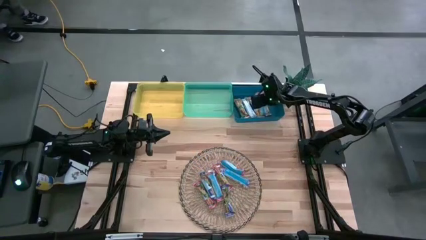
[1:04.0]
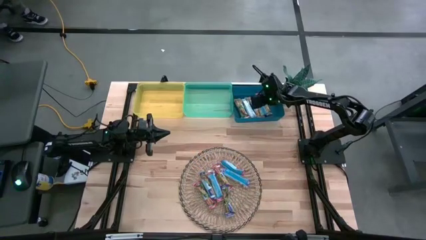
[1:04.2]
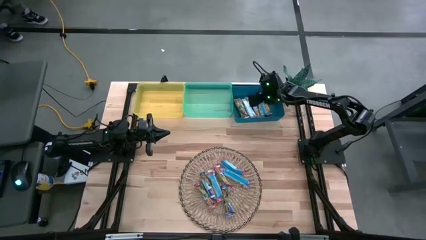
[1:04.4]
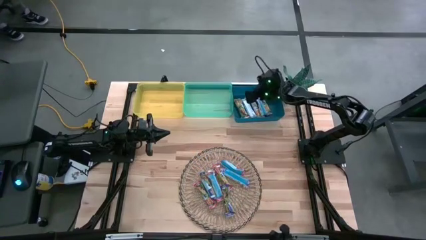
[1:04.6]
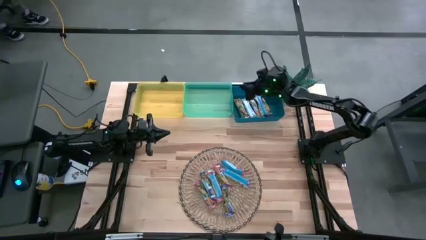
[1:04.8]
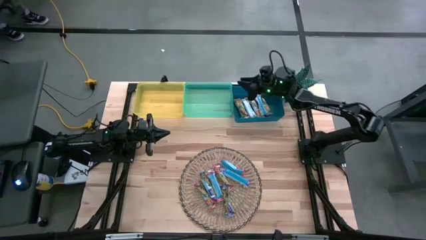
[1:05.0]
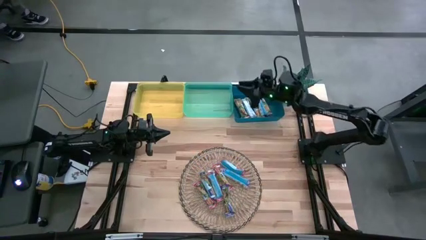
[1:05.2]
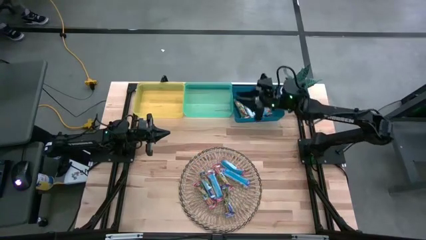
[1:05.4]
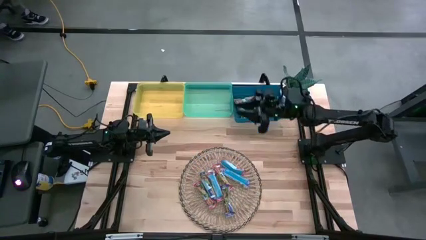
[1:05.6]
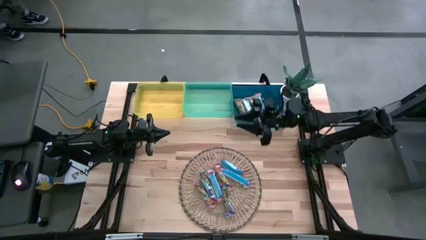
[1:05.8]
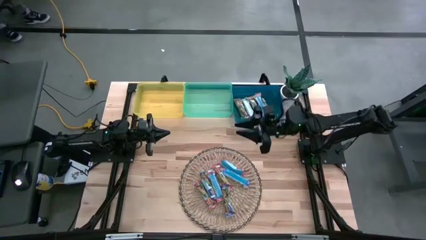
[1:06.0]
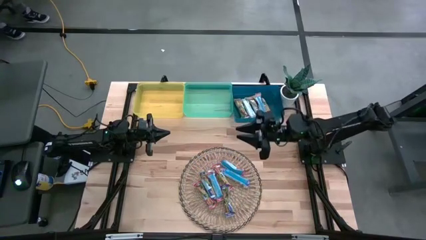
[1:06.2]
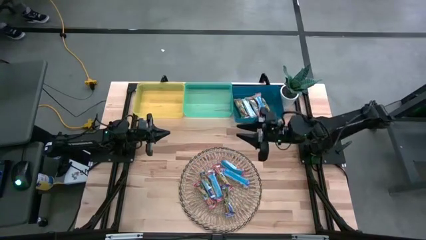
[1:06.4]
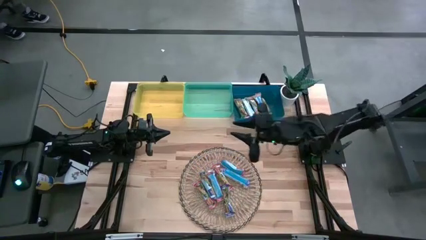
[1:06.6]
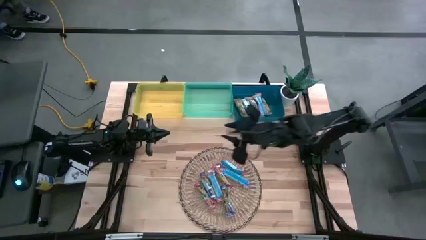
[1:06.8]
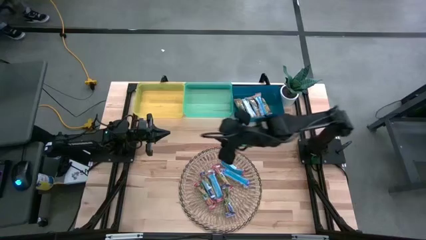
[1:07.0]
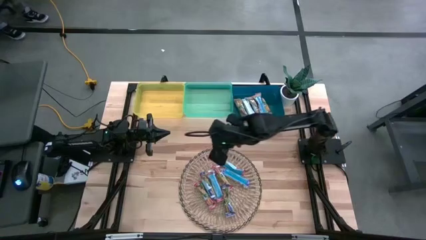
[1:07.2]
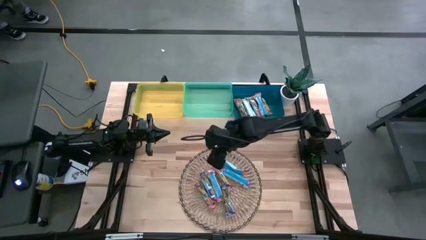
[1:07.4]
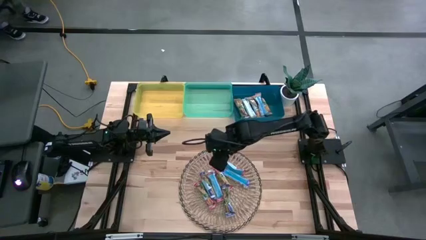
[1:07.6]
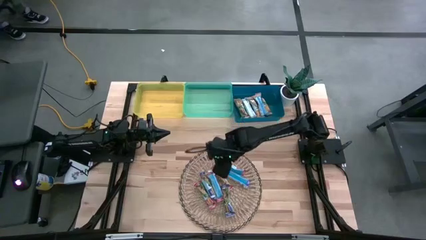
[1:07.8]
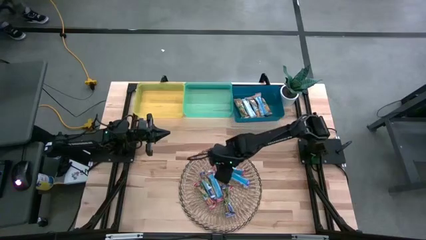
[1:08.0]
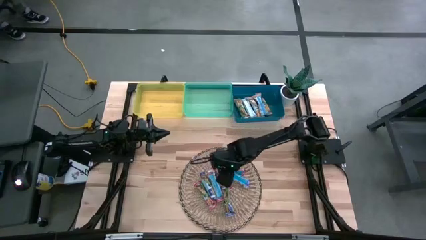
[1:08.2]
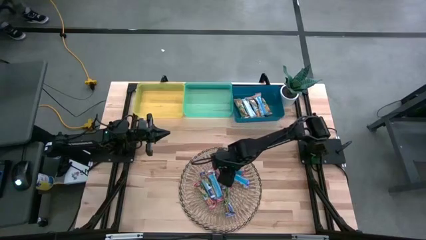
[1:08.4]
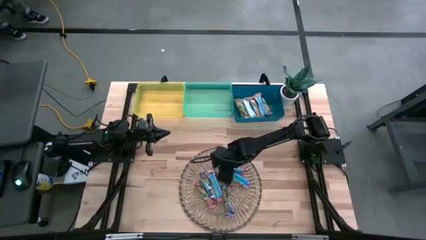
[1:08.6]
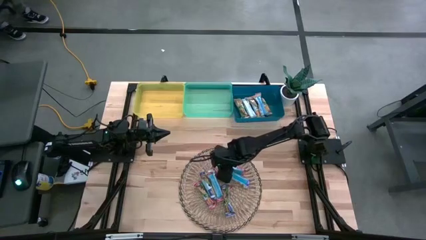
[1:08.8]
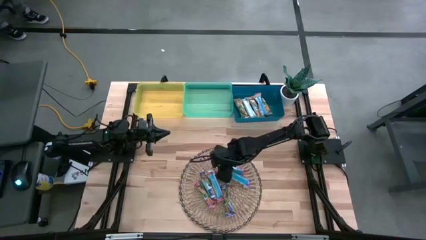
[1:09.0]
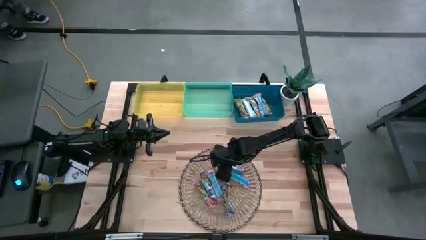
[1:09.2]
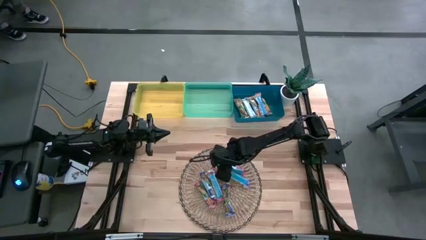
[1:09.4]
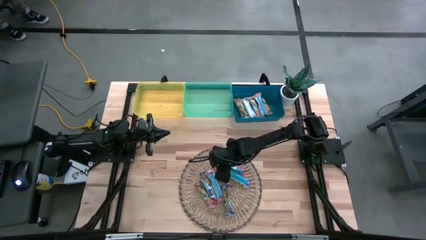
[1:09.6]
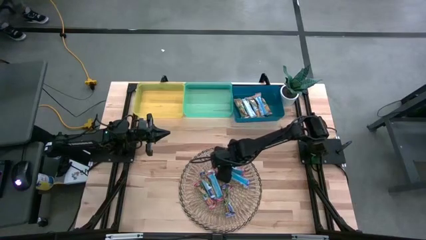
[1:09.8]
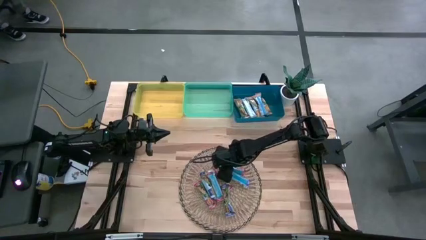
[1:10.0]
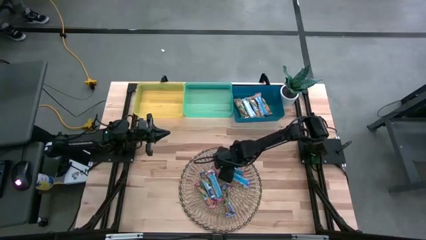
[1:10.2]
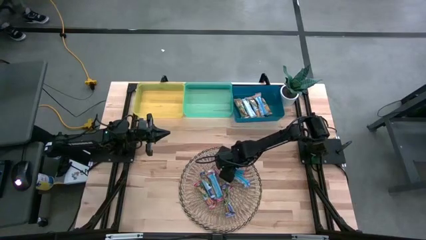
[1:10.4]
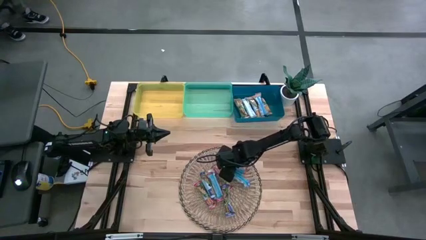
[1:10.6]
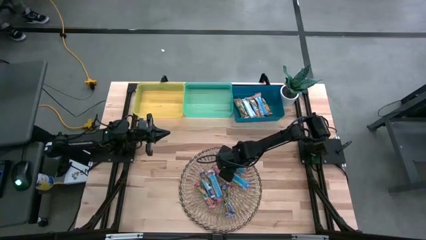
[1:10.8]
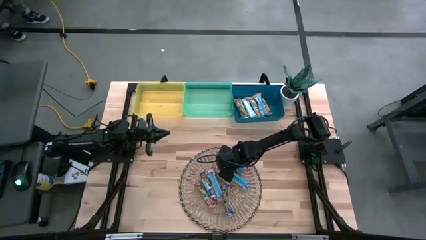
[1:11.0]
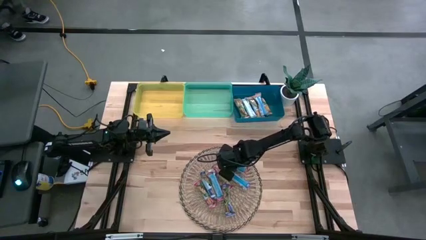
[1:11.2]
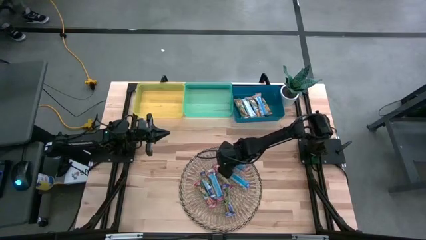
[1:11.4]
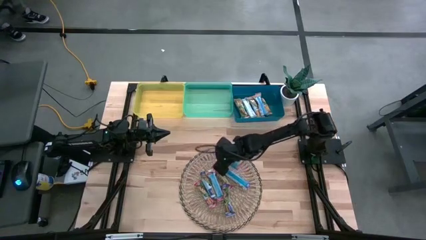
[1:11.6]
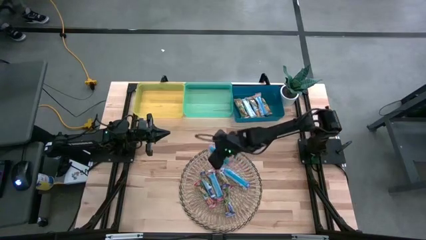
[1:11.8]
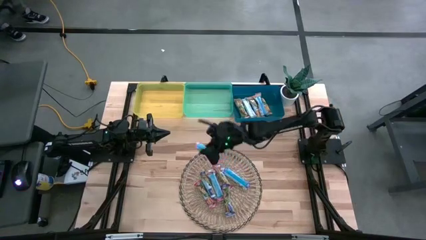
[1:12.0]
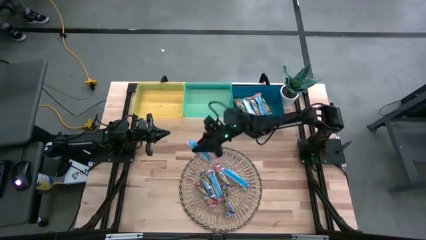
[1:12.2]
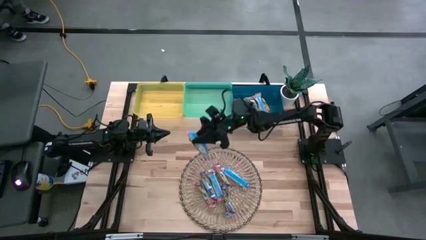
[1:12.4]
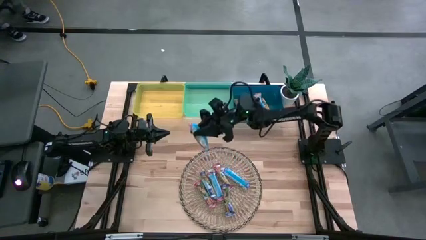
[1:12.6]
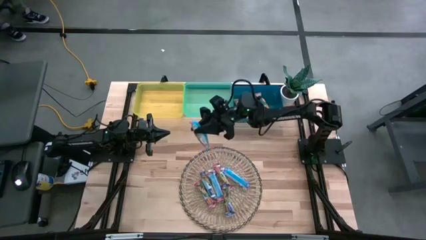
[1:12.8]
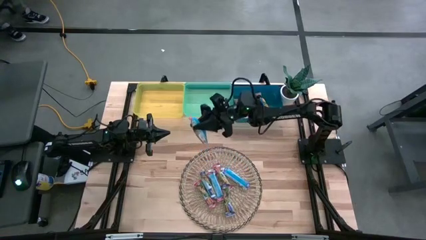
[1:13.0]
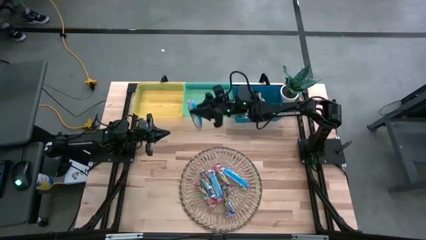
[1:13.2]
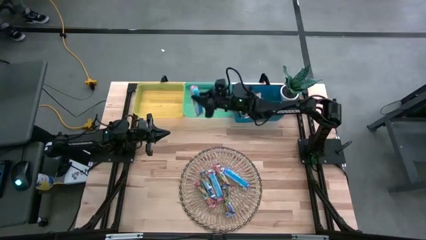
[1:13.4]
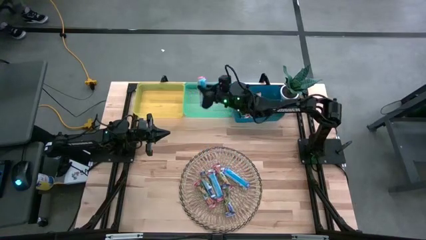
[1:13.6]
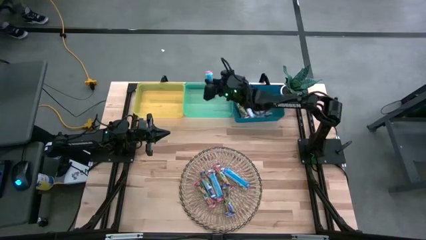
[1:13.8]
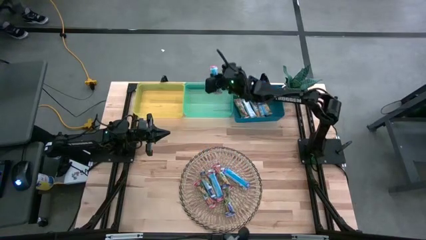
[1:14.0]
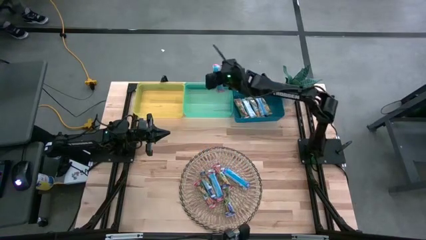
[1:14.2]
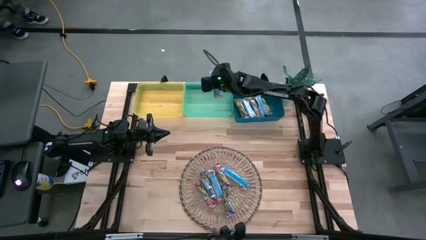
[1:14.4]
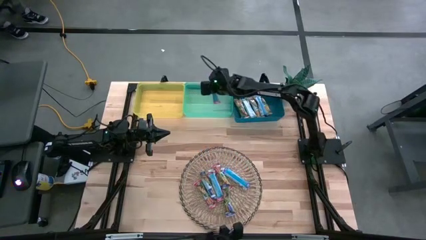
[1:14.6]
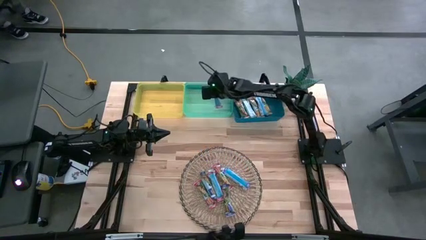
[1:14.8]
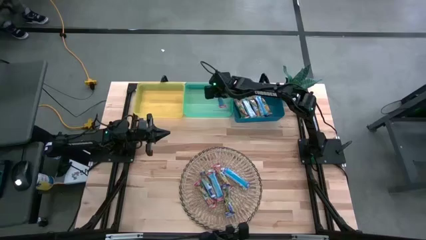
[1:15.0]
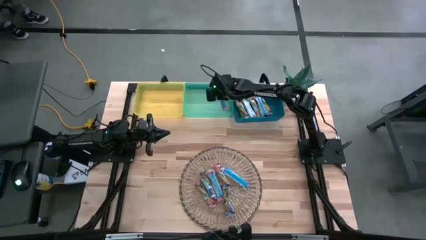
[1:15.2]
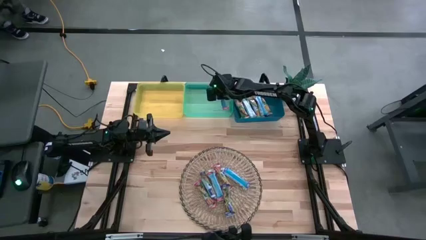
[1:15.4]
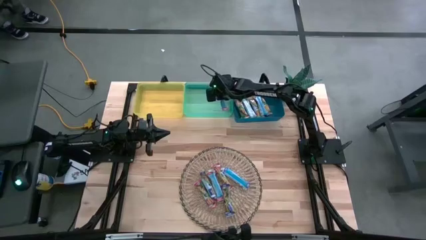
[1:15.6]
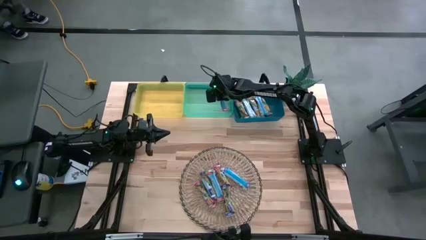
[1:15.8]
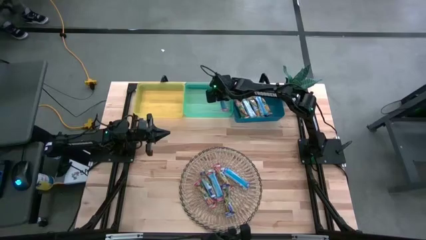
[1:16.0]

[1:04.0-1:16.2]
Task: Pick and place Granola Bars by type
Put the red granola bar into the light green bin
